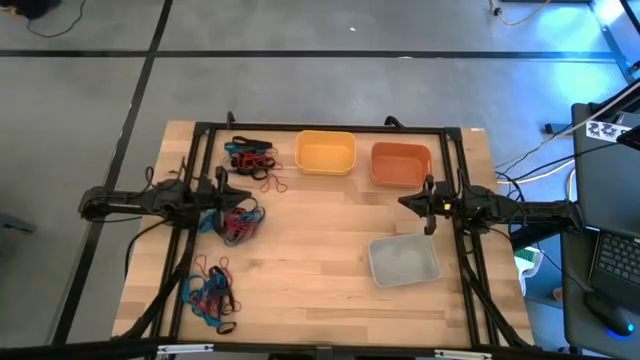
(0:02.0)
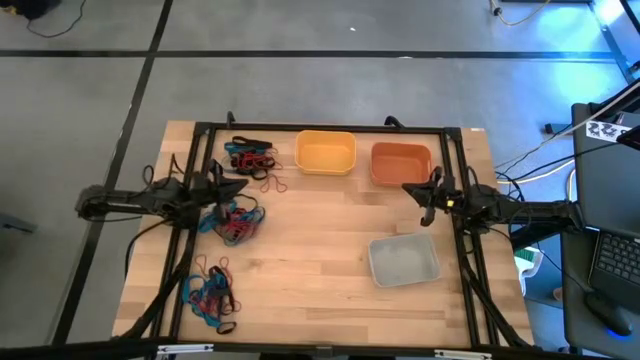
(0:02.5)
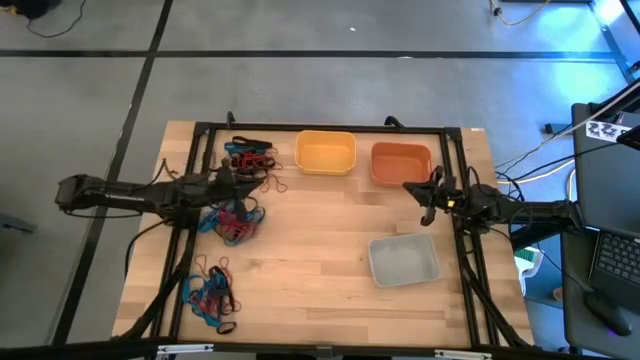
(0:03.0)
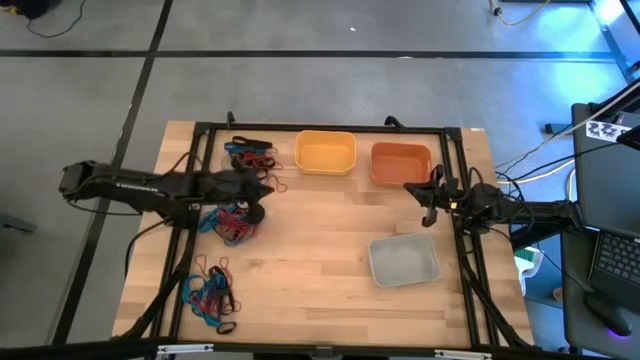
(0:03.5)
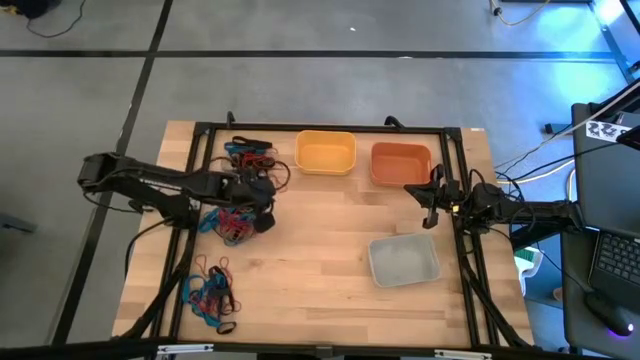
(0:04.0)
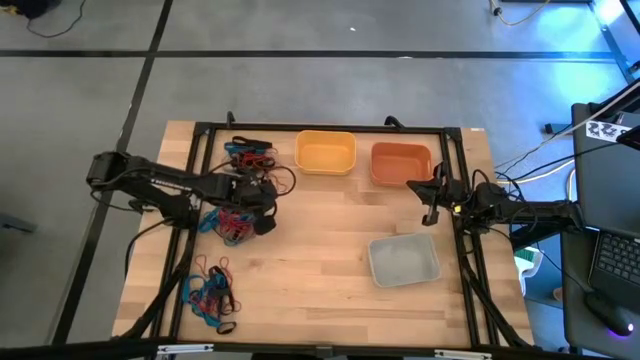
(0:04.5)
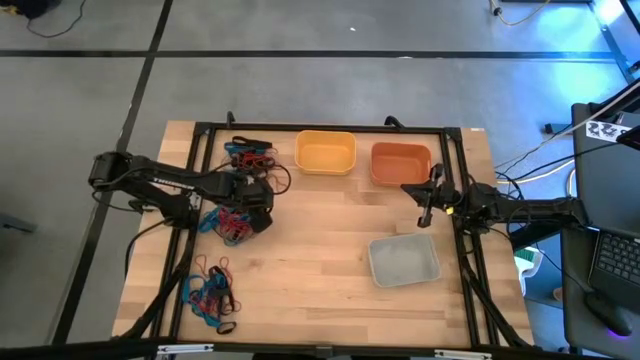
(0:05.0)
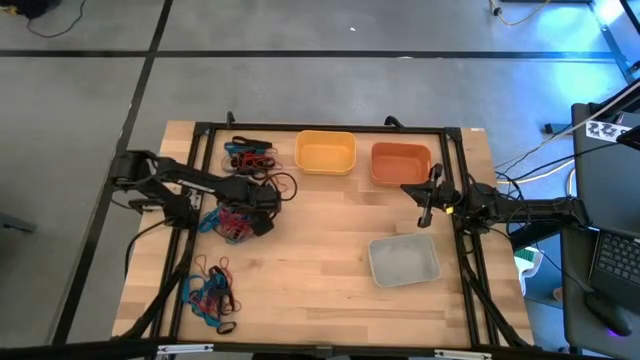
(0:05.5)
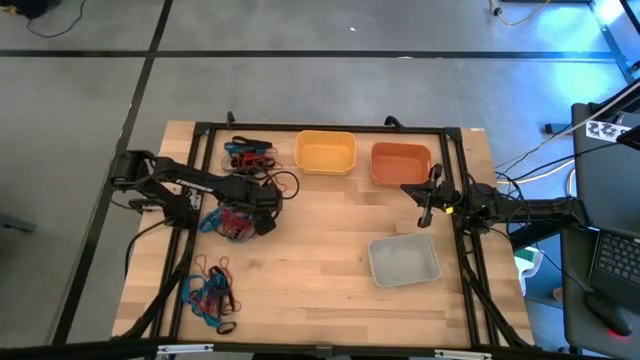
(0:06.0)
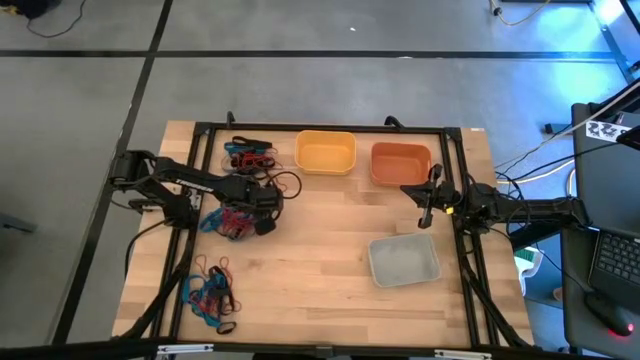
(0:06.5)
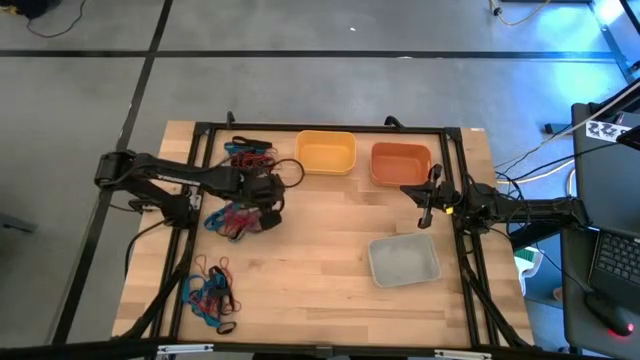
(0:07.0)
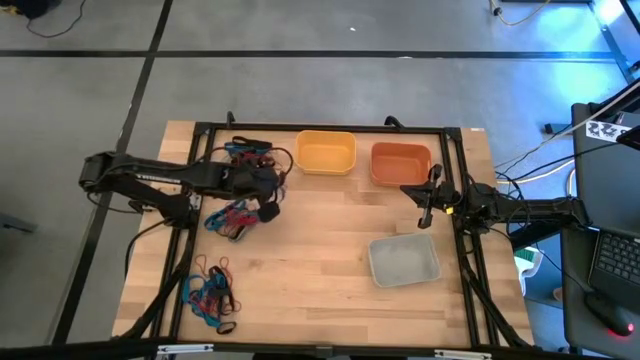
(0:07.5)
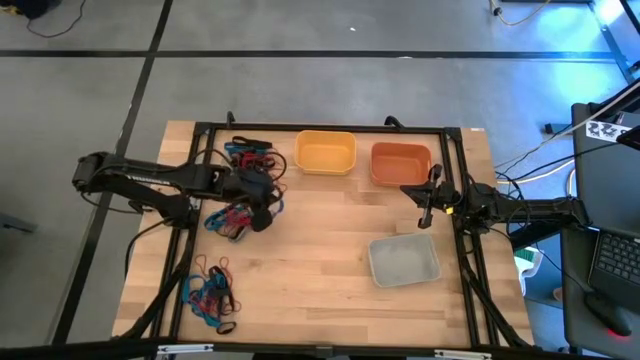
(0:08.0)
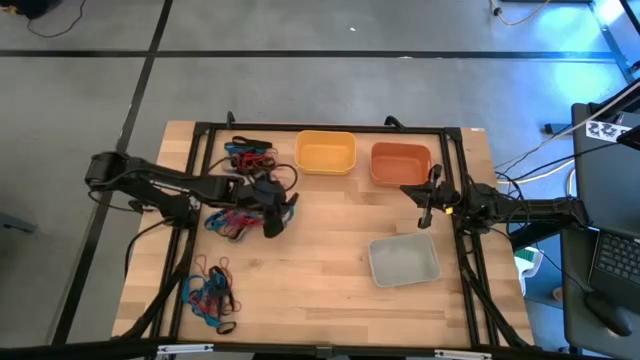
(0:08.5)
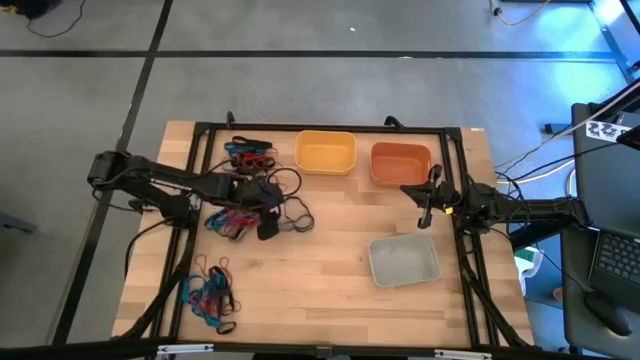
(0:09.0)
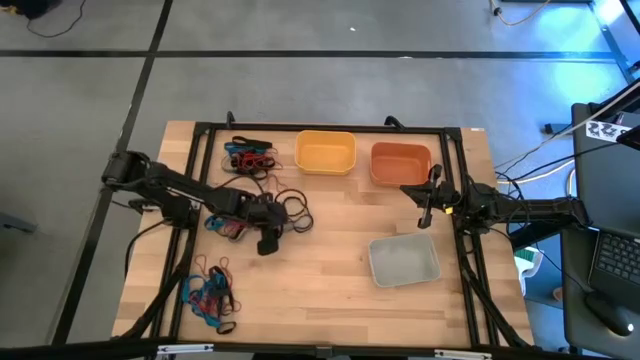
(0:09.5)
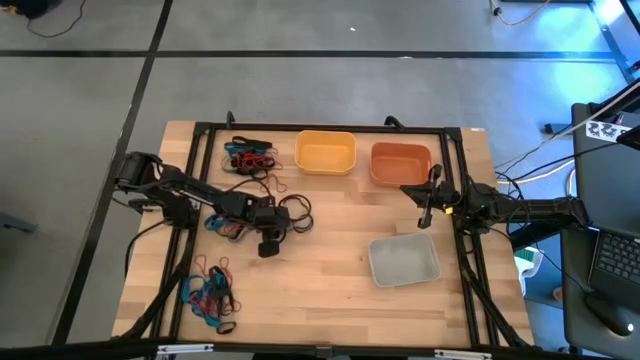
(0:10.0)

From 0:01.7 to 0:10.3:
Task: Sort rubber bands into baskets
Put the blue rubber band into the yellow bin

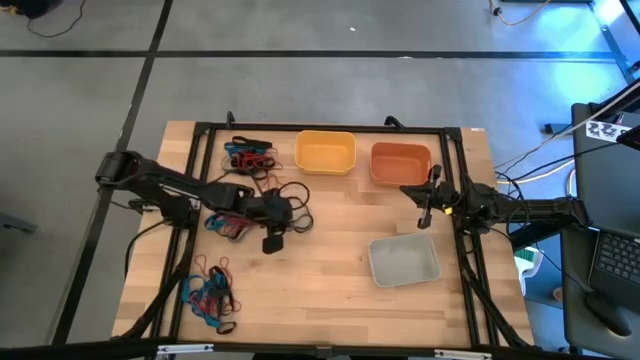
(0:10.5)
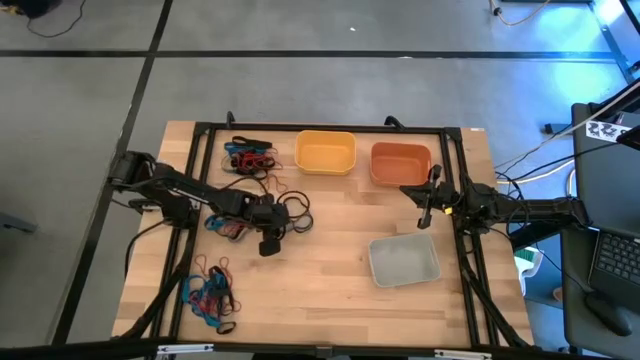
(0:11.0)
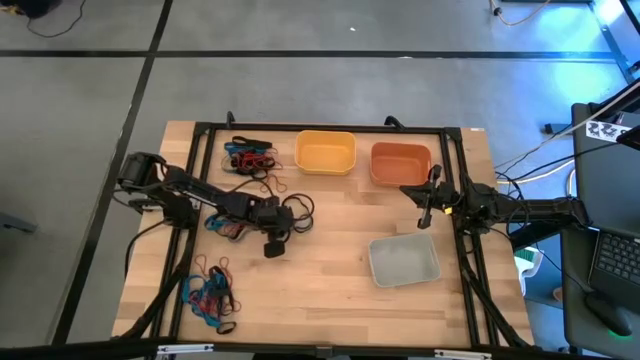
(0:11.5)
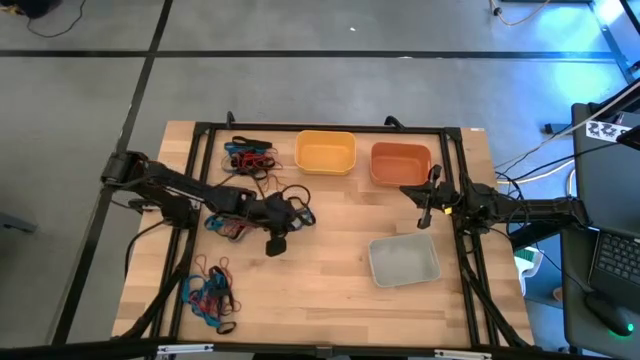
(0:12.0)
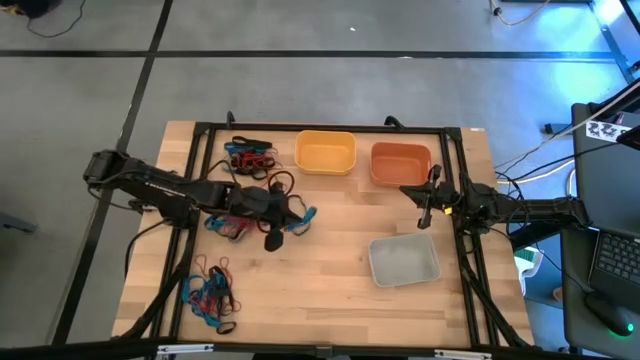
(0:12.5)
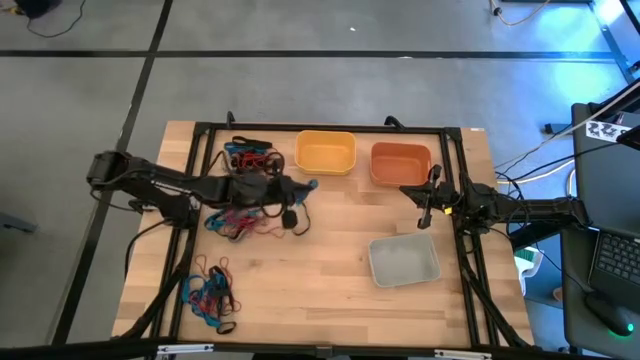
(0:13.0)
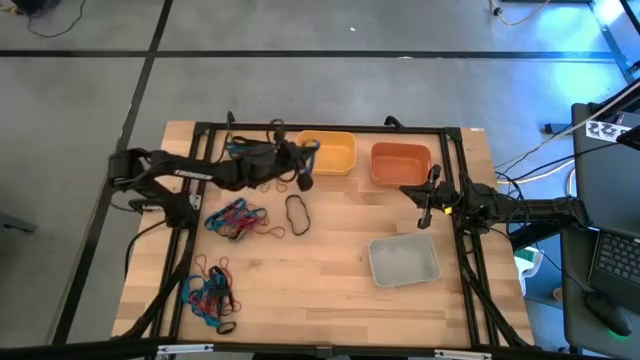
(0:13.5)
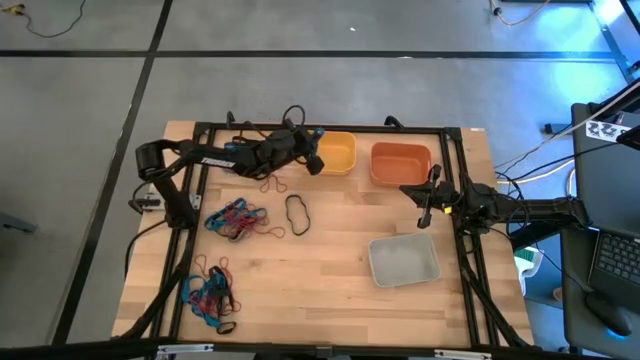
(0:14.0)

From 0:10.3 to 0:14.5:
Put the blue rubber band into the yellow bin

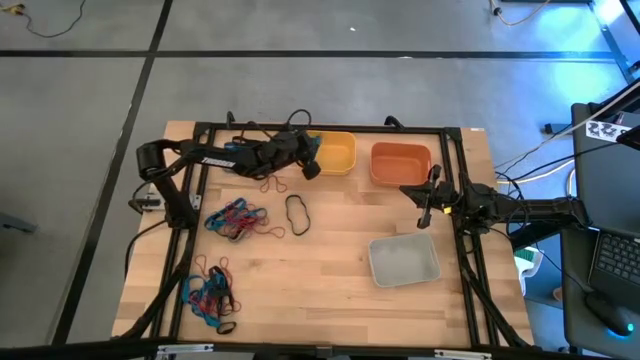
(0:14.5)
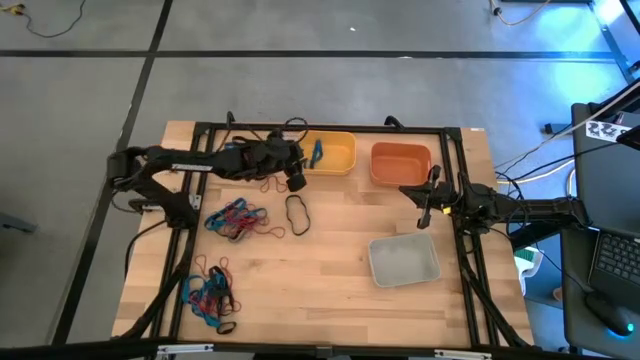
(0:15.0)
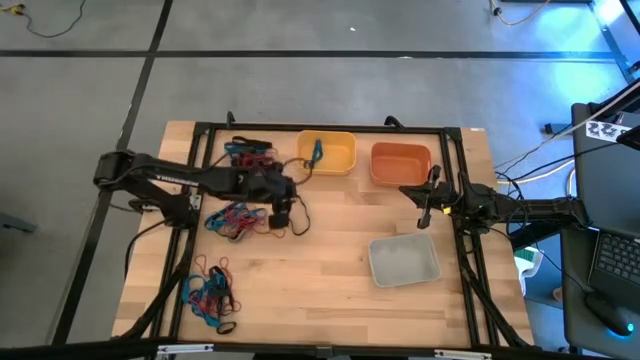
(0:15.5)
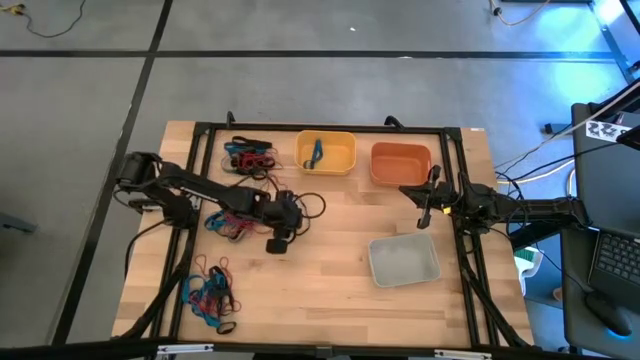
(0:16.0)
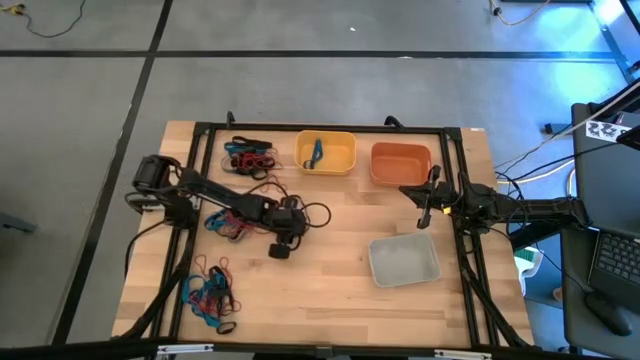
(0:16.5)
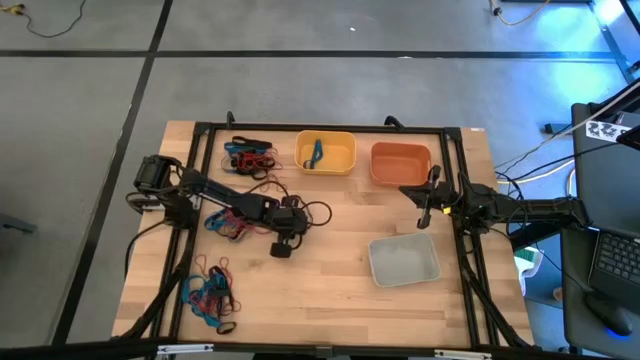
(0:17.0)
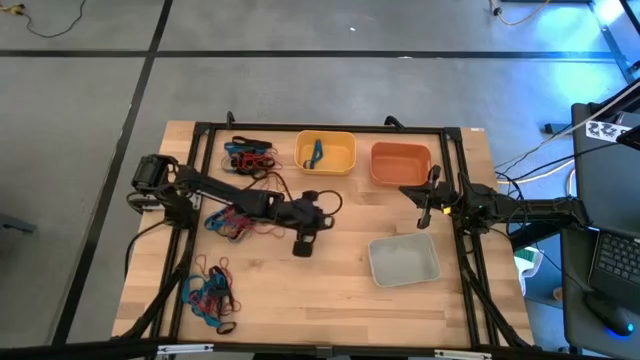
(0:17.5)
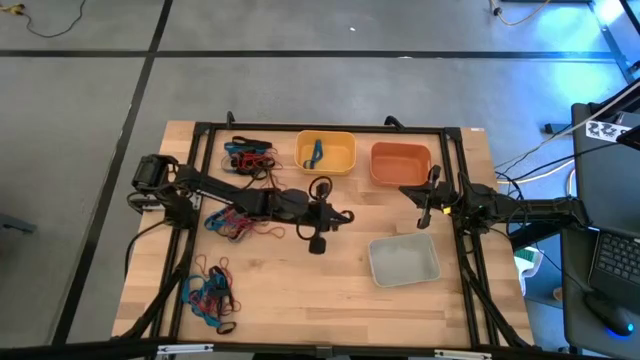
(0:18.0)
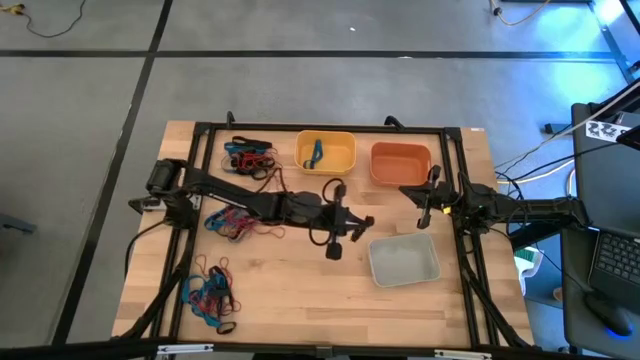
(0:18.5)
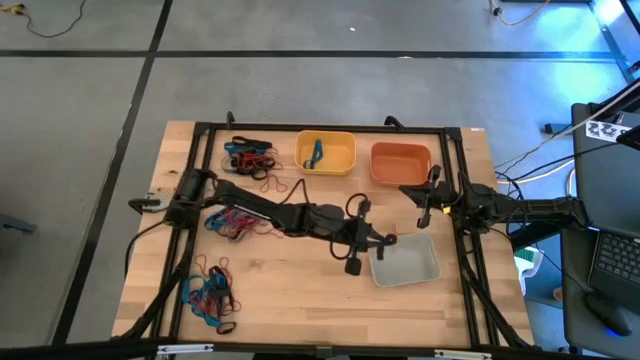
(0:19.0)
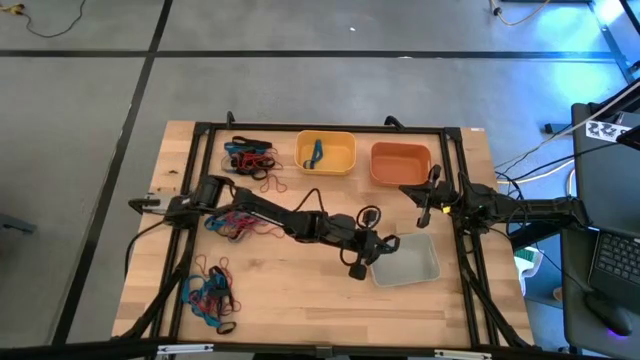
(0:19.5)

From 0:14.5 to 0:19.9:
Put the black rubber band into the white bin

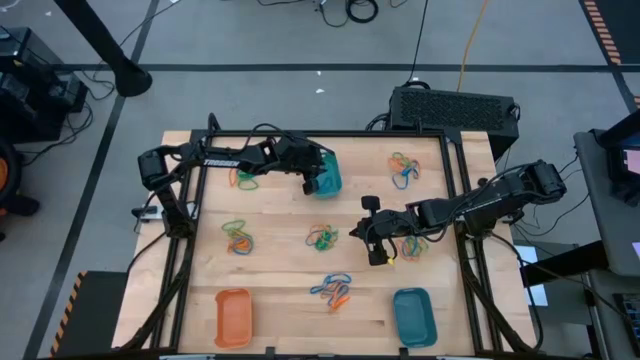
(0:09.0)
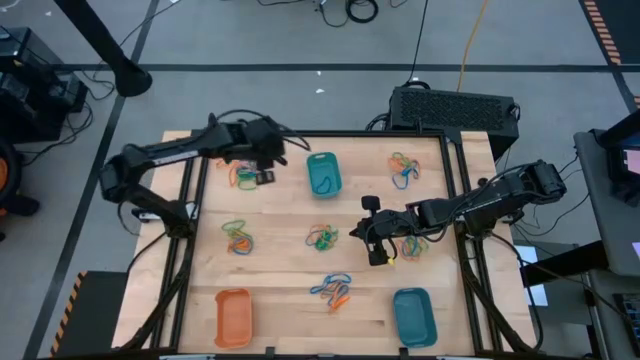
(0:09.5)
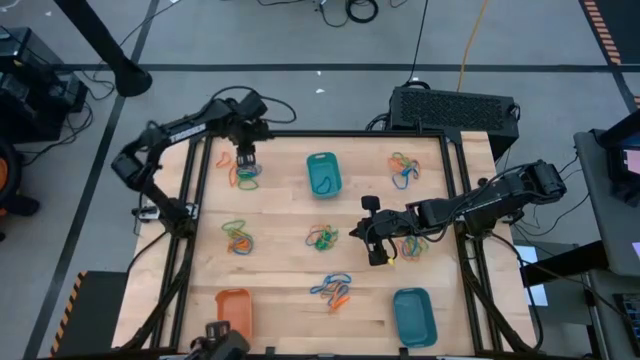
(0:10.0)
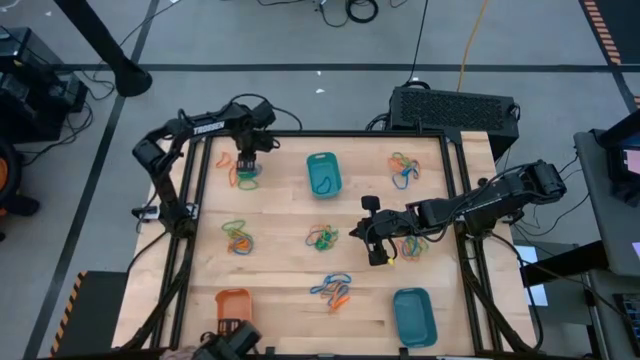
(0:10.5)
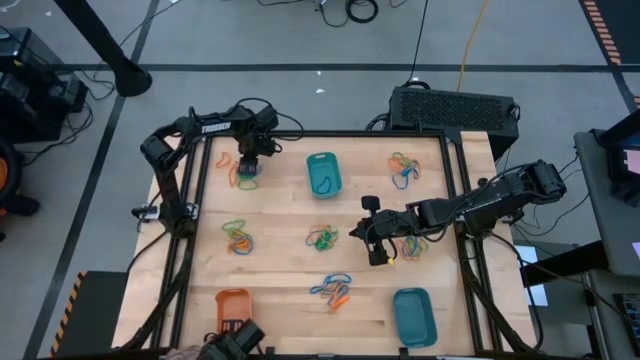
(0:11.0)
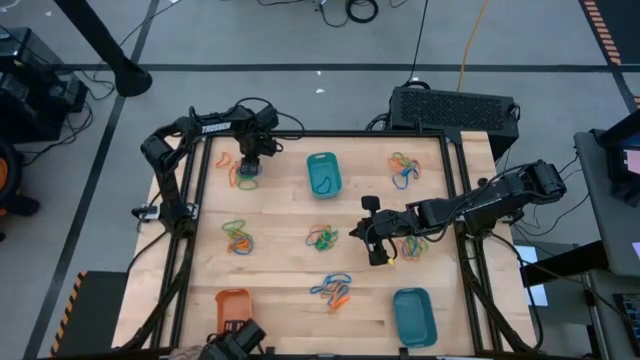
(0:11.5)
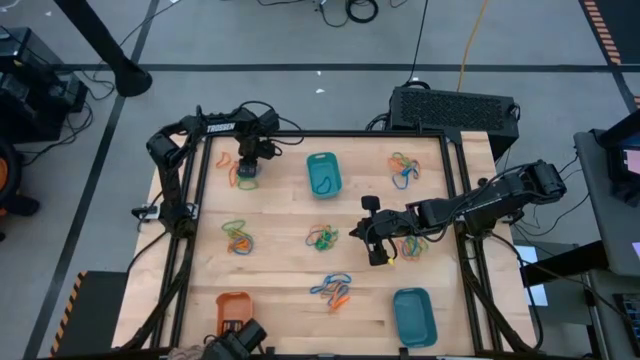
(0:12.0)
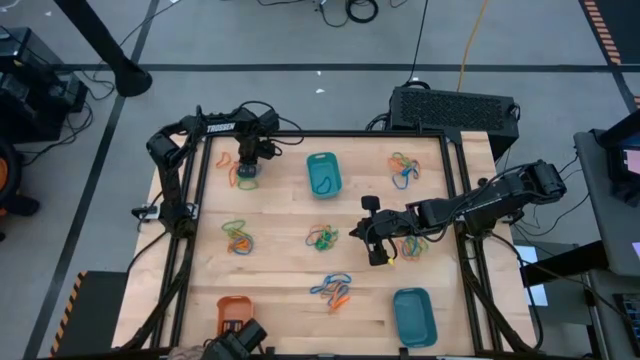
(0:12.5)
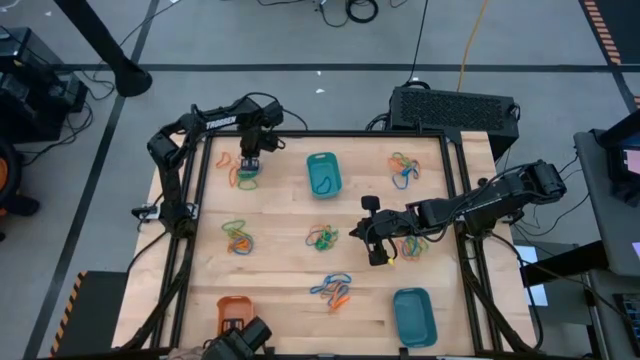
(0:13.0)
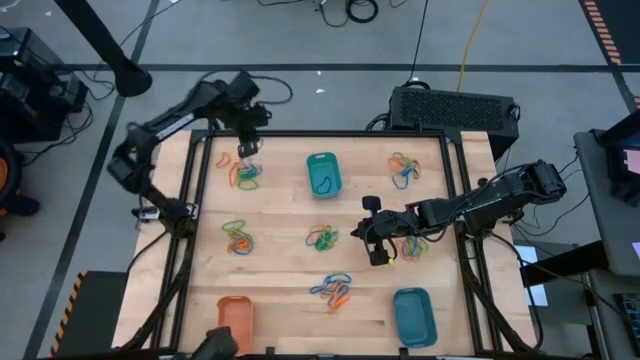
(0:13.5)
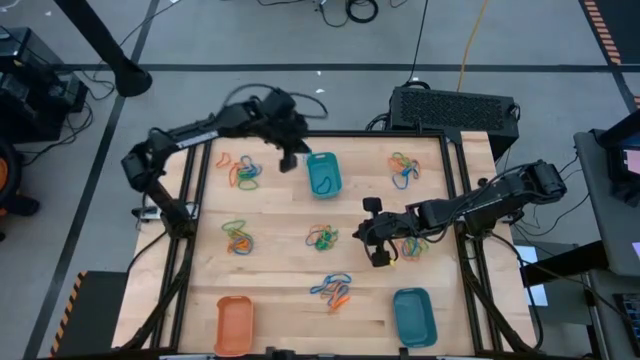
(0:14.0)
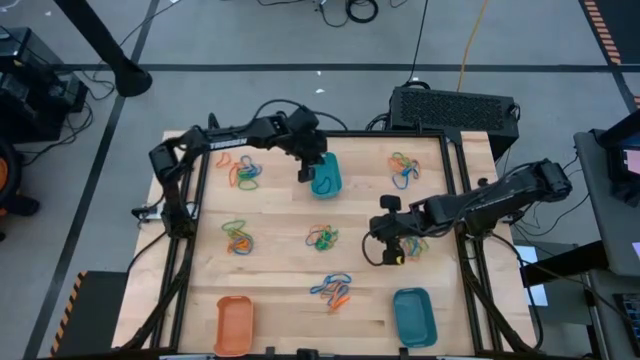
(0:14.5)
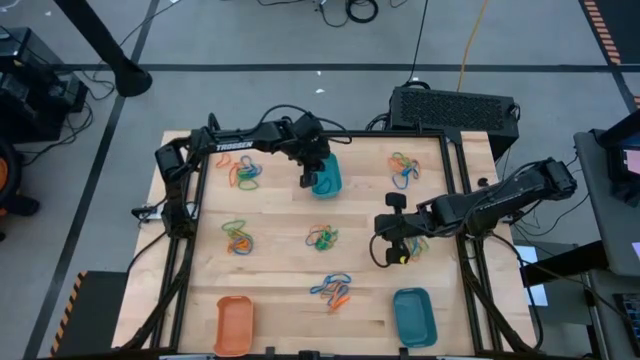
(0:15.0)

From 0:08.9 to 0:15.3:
Task: Sort rubber bands into baskets
Put the blue rubber band into the top blue bin
